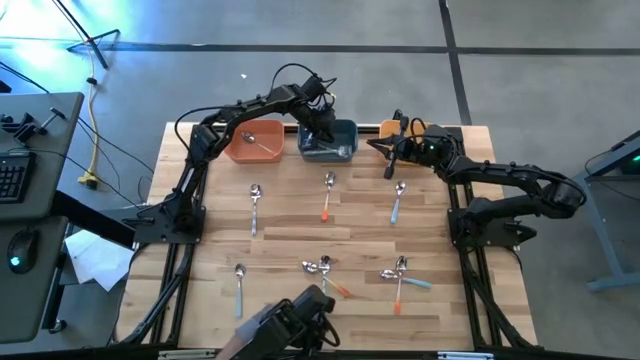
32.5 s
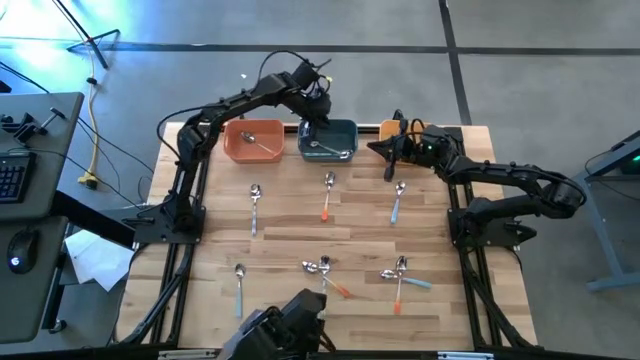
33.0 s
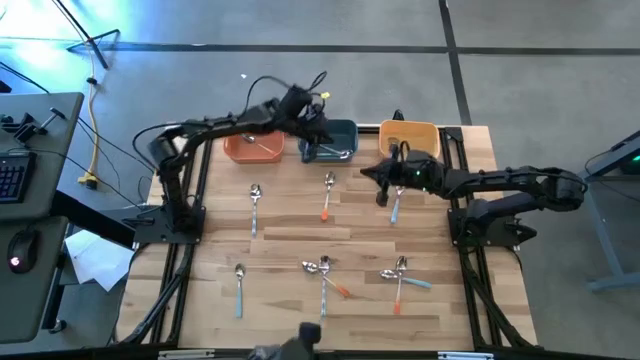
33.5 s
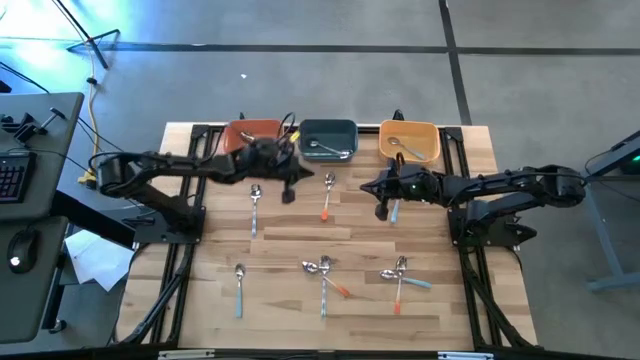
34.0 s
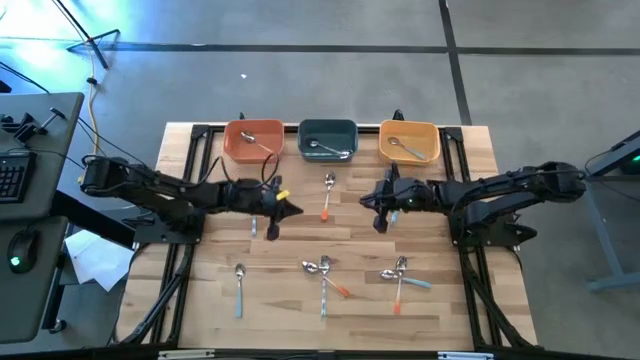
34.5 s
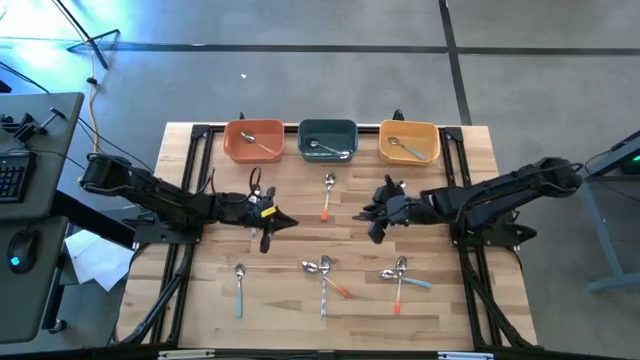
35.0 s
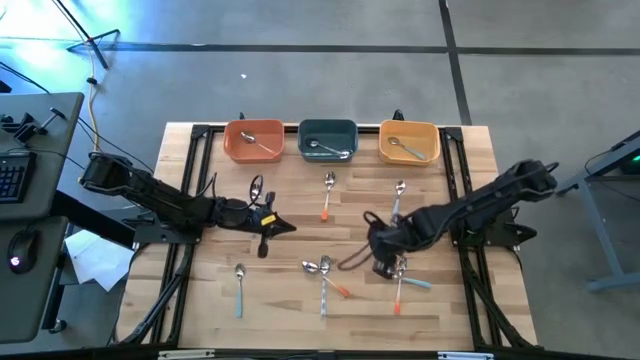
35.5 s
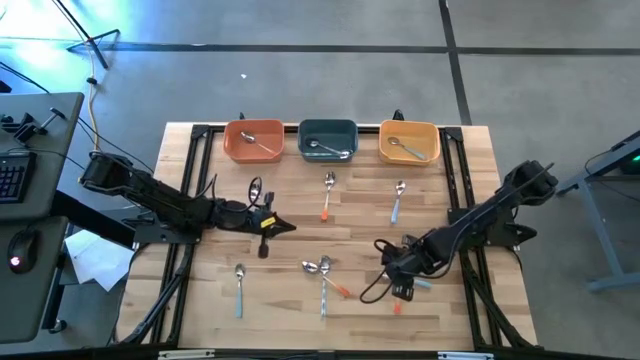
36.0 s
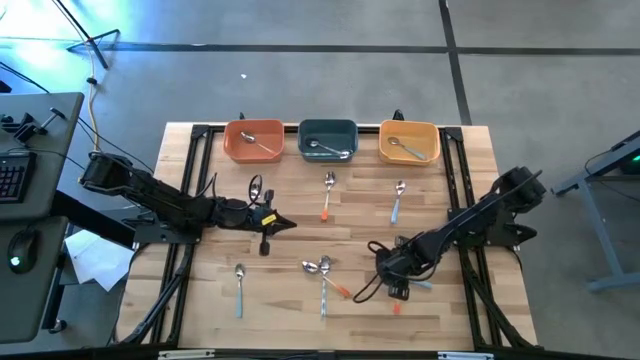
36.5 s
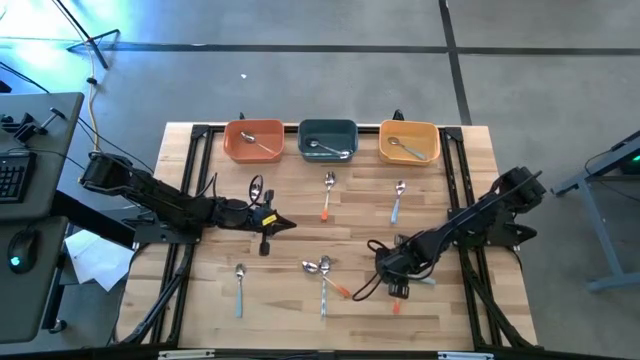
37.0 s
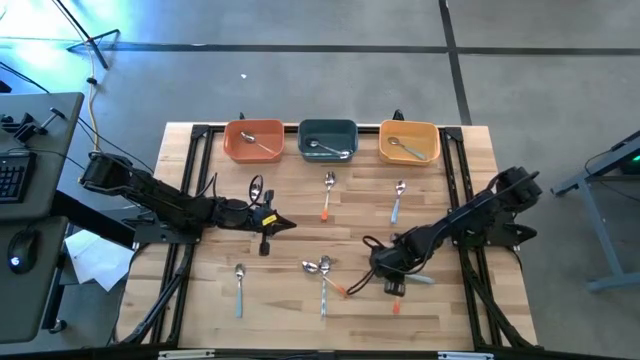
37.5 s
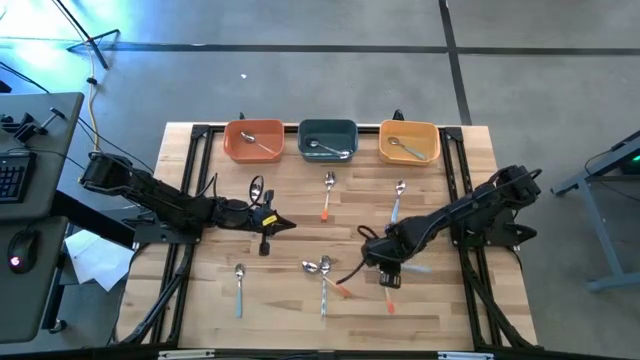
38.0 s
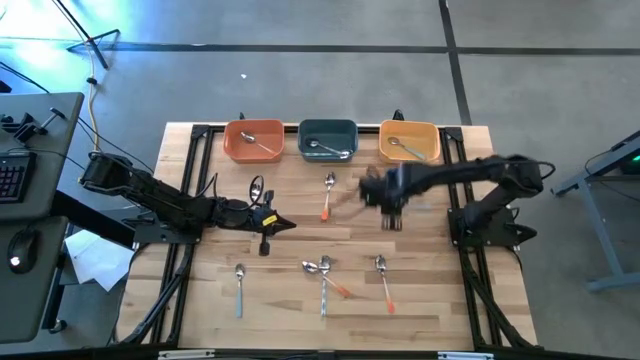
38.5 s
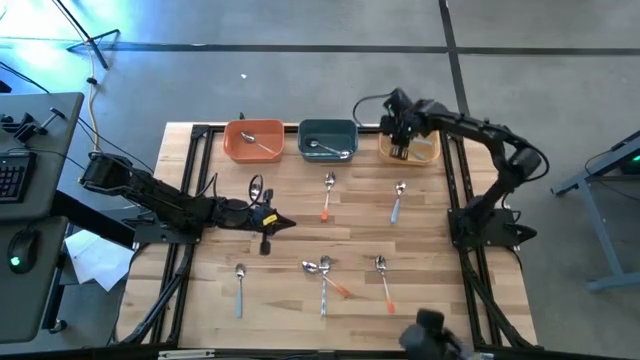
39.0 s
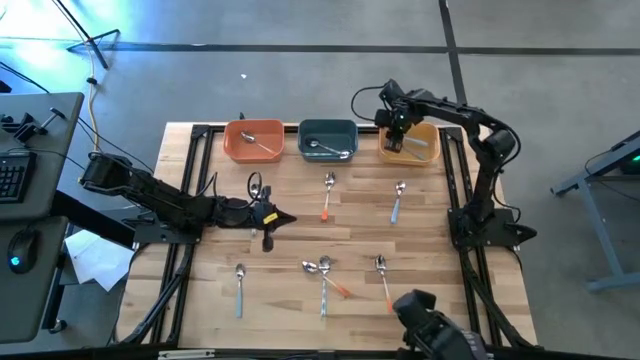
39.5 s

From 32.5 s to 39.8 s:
Task: Sort silverware by color (type)
Put the blue spoon into the yellow bin

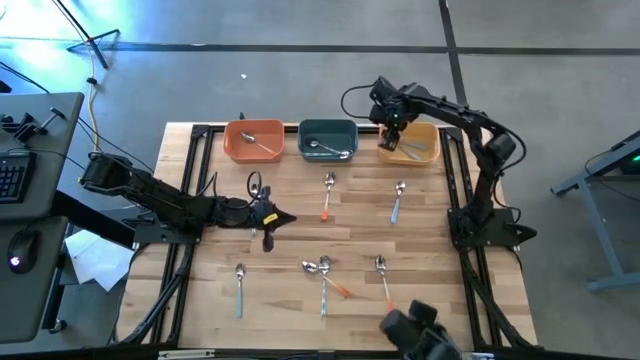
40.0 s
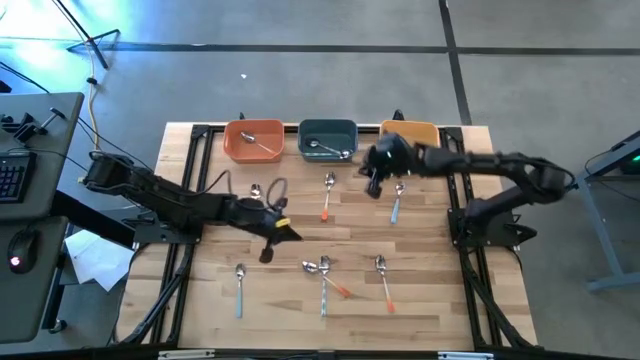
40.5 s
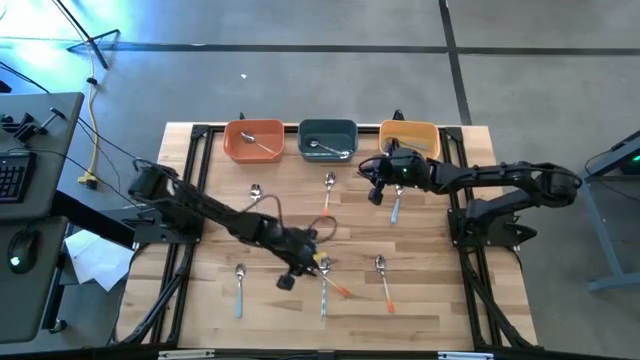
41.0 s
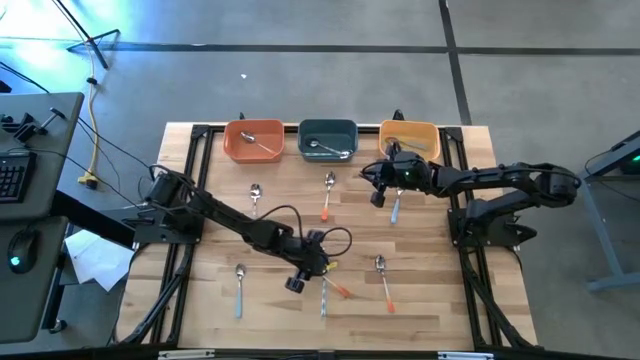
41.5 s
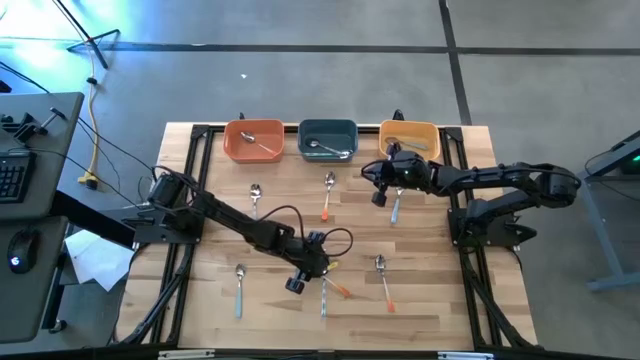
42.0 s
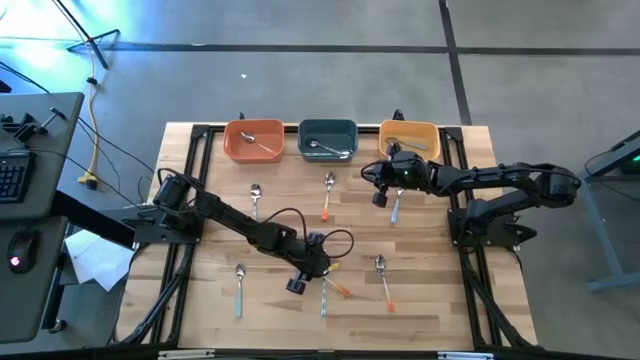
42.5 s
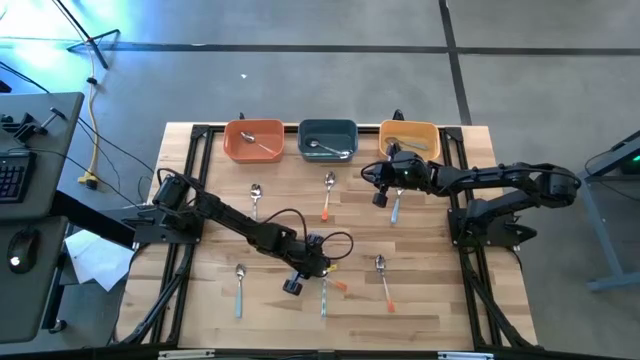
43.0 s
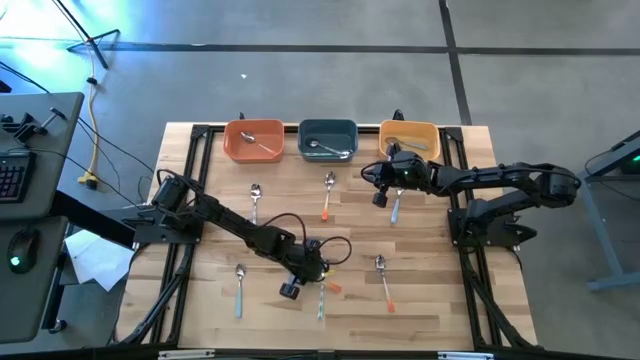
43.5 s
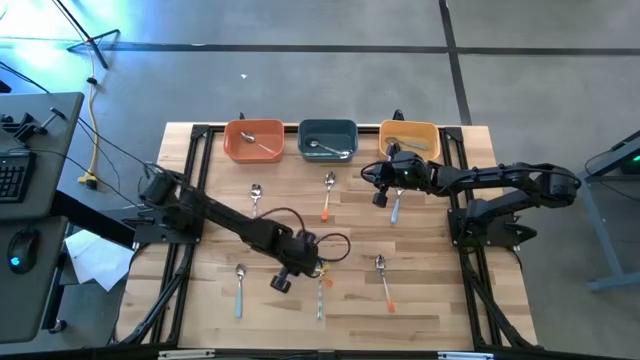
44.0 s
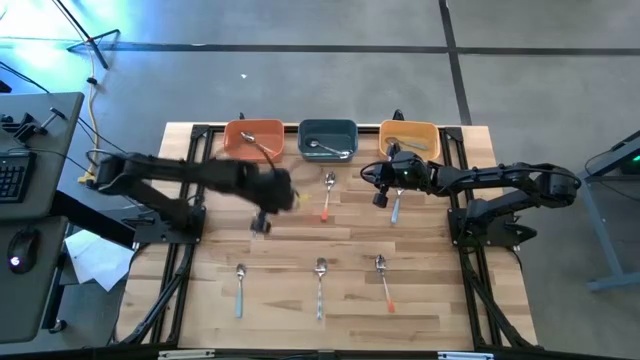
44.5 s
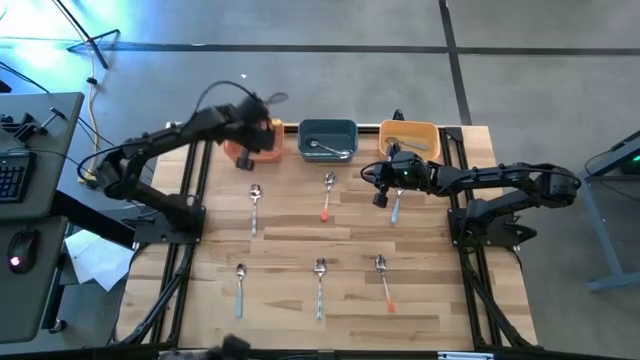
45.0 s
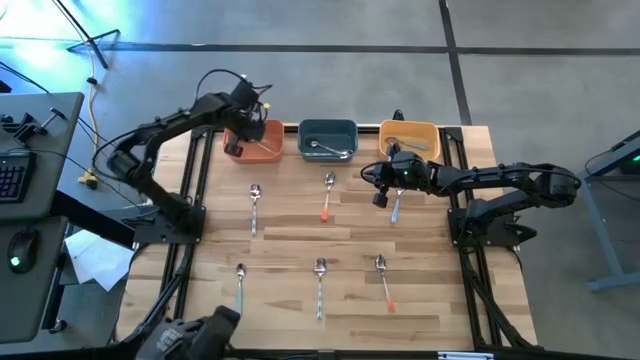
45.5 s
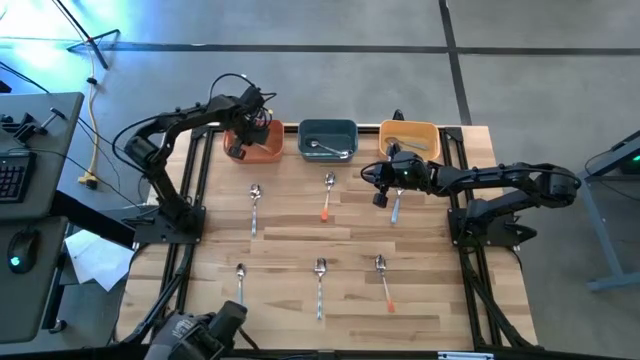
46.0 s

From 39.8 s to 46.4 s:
Put the orange spoon into the orange bin

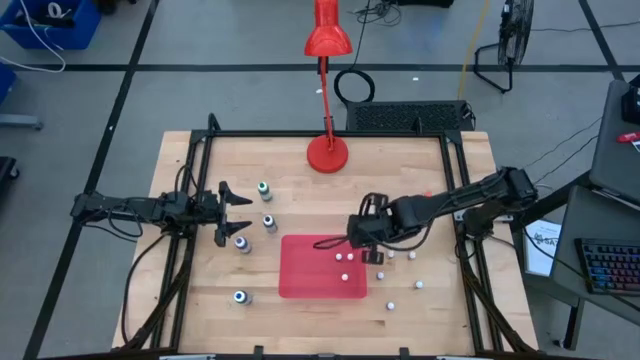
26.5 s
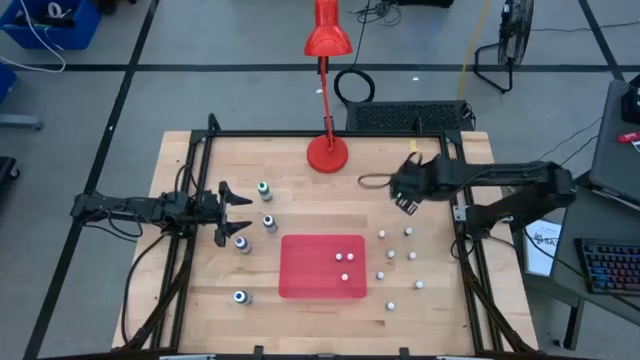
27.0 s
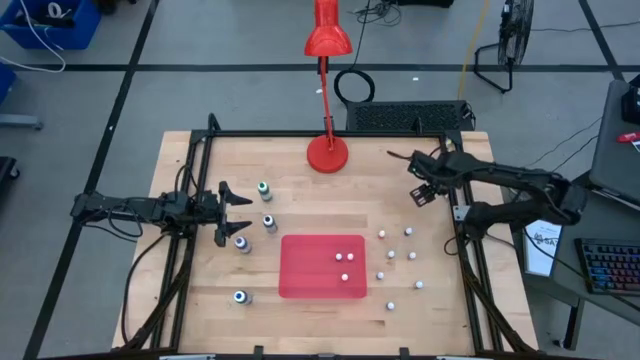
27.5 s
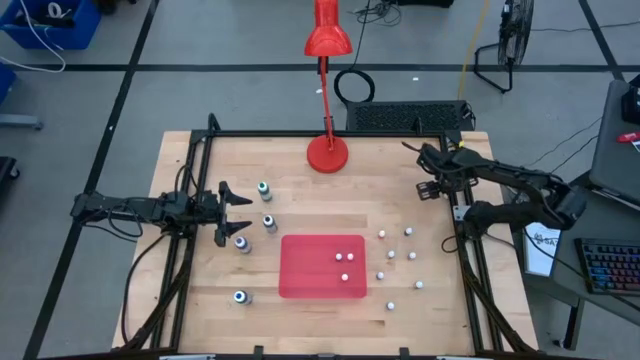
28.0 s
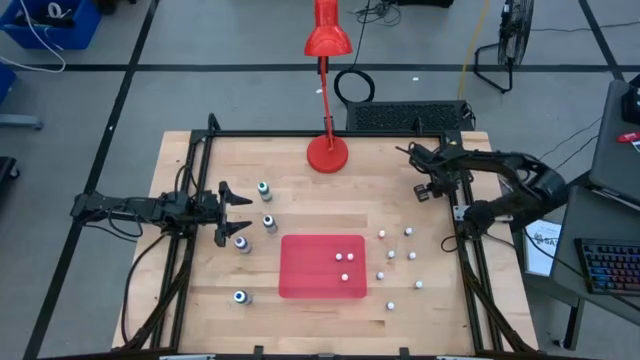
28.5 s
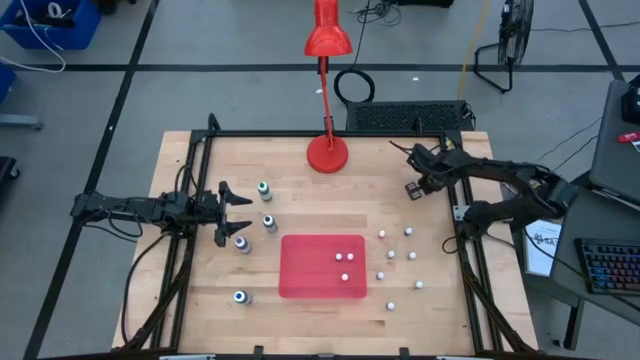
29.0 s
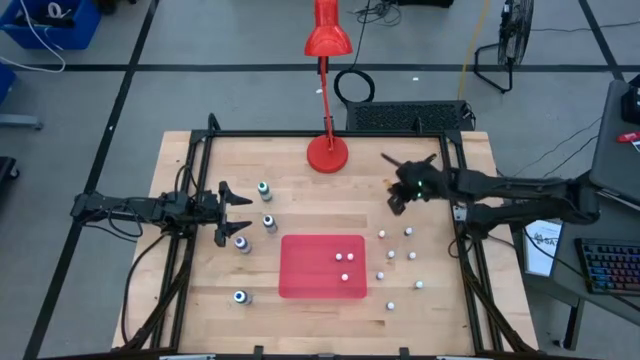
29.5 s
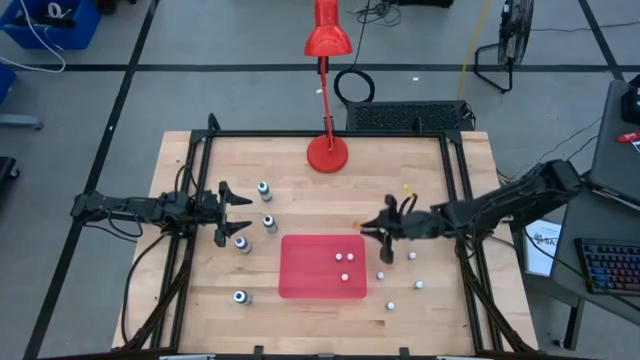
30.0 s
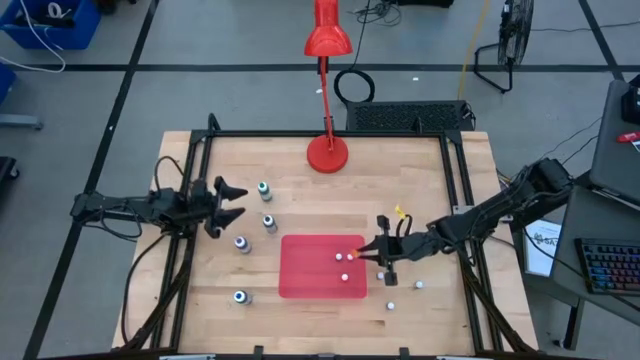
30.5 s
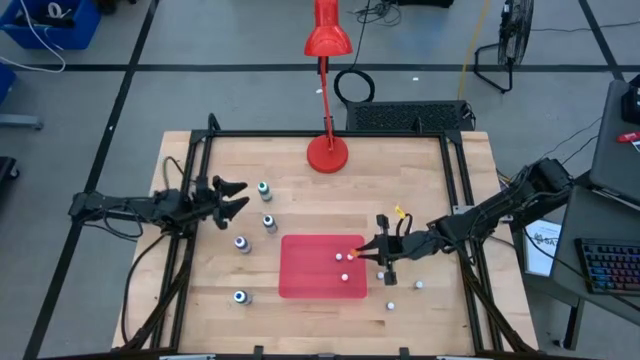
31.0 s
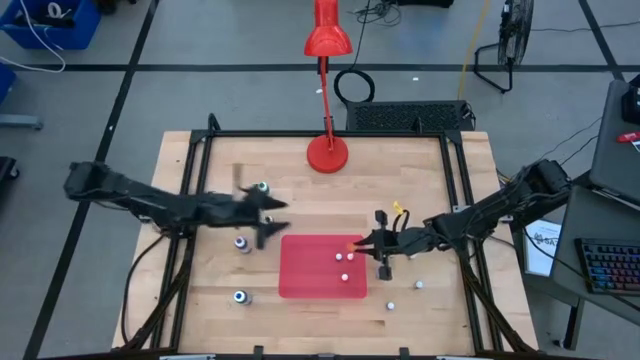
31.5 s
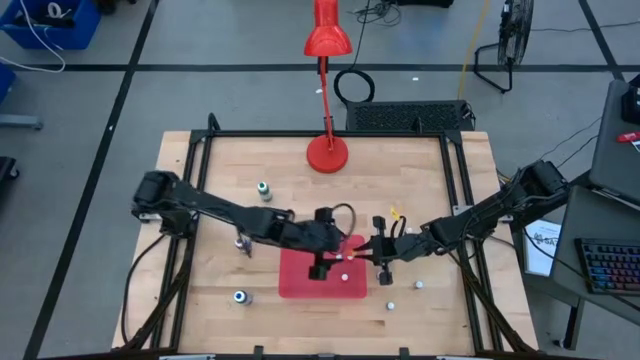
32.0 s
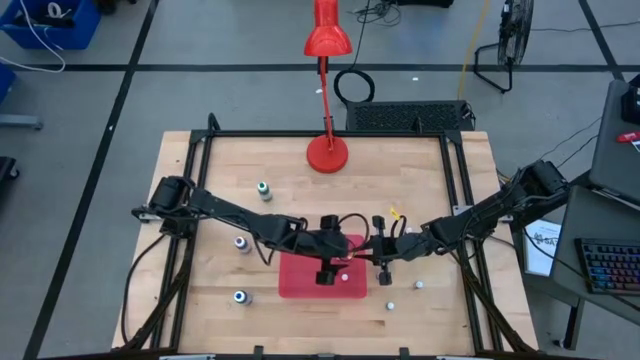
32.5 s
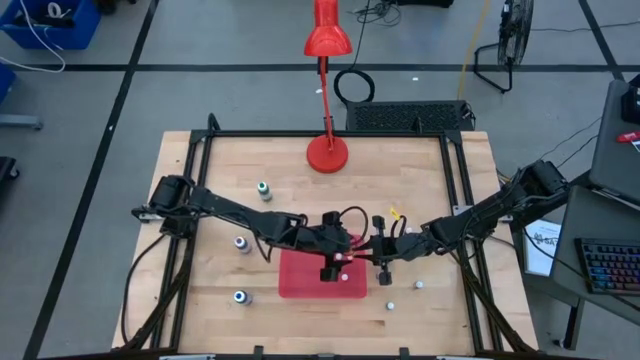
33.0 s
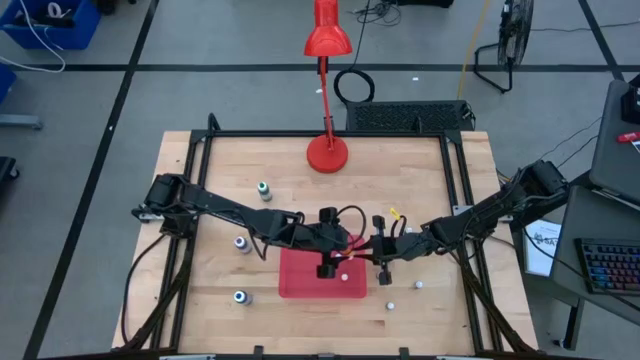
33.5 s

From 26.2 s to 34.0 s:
Task: Pick & Place food coloring
Put the small yellow food coloring bottle into the pink container
